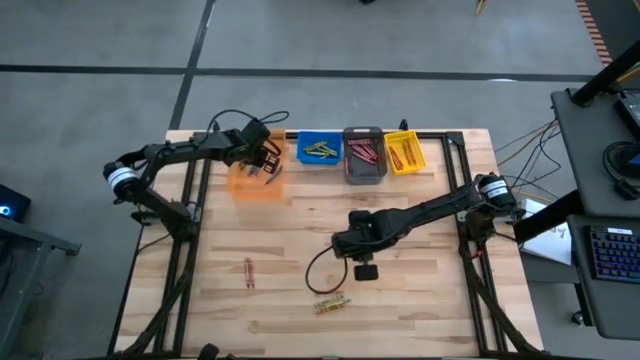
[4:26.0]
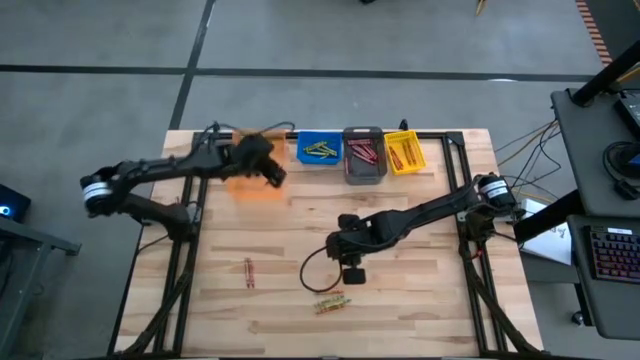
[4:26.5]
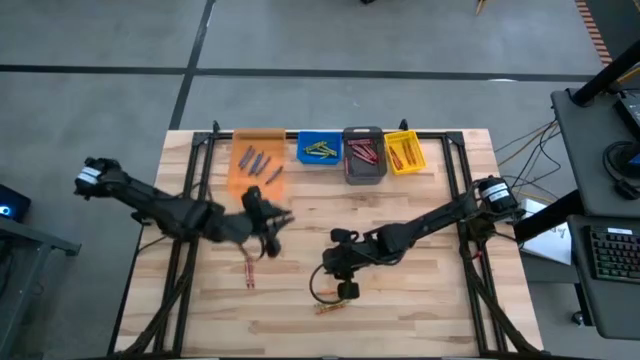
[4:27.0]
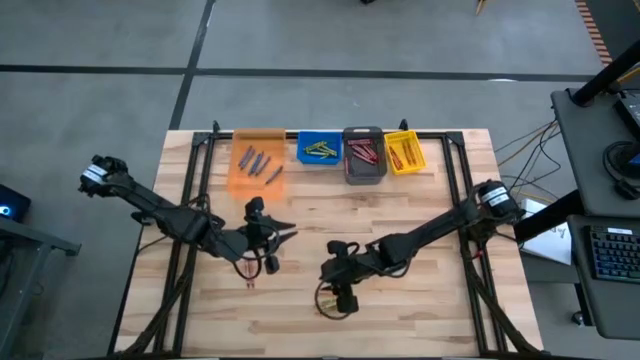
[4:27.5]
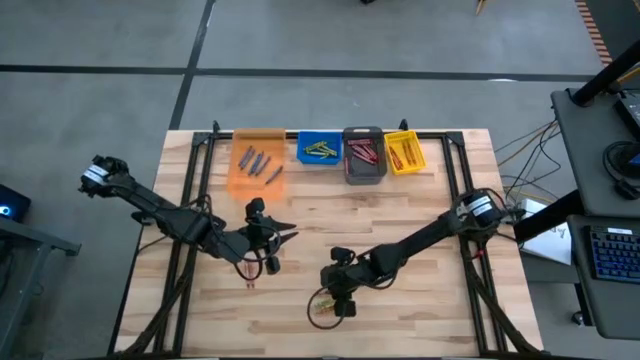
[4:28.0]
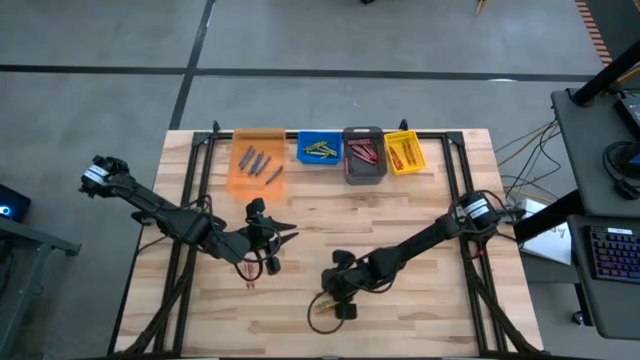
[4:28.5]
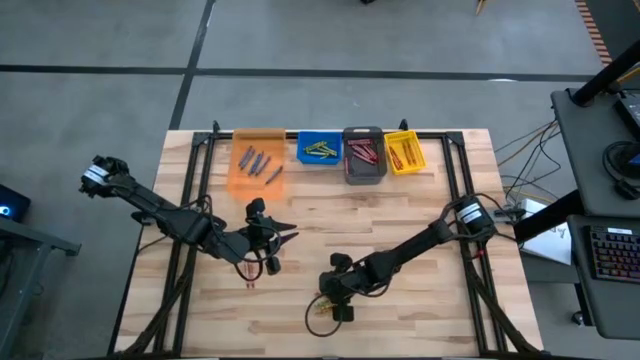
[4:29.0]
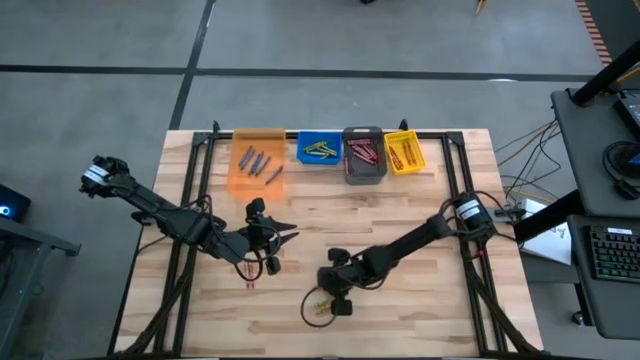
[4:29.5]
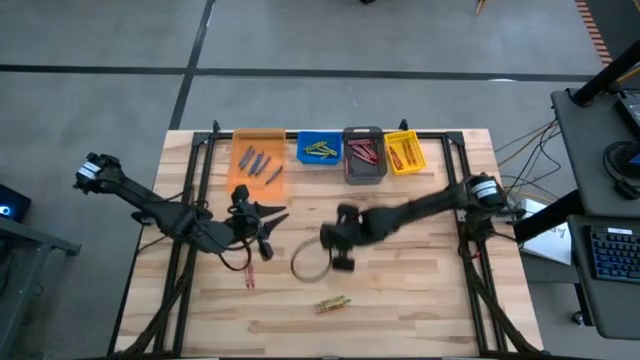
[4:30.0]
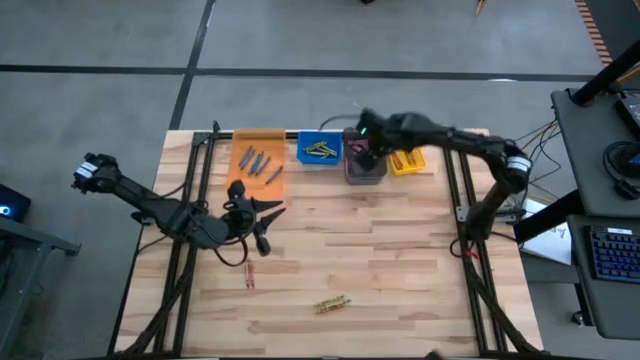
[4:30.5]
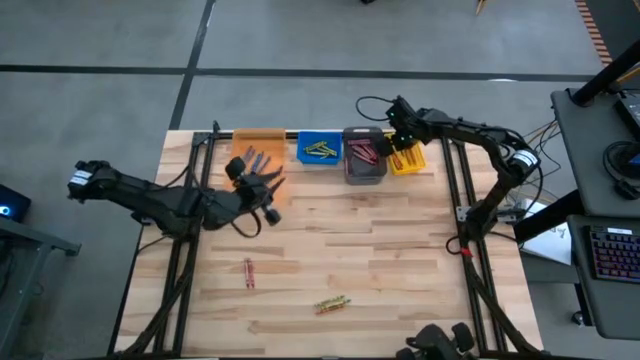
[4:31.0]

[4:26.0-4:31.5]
Task: Sort crayons
Put the orange crayon into the yellow bin

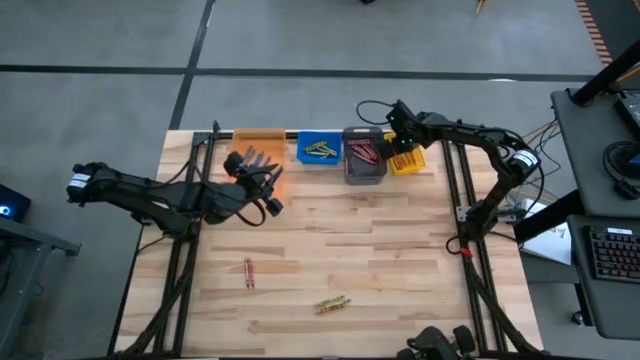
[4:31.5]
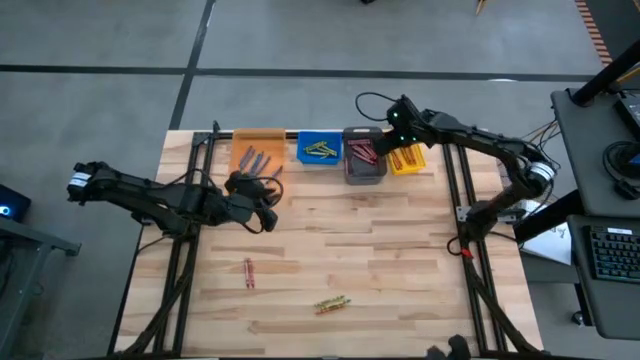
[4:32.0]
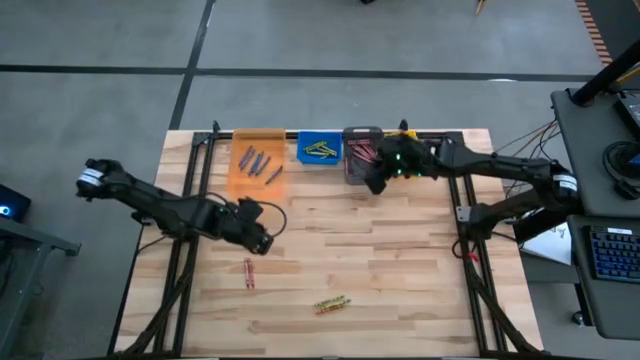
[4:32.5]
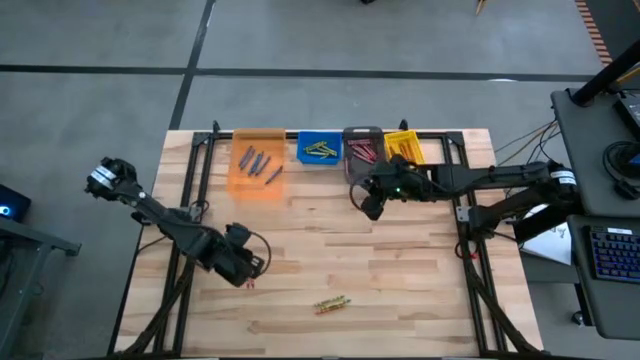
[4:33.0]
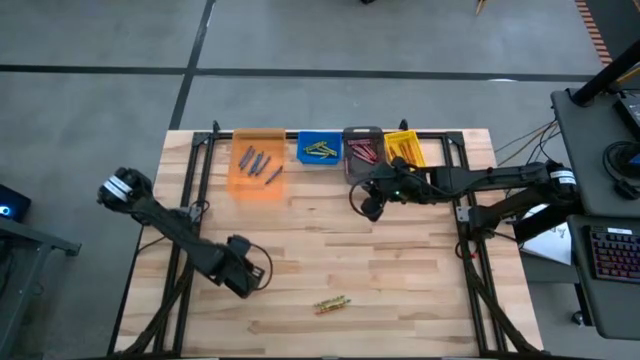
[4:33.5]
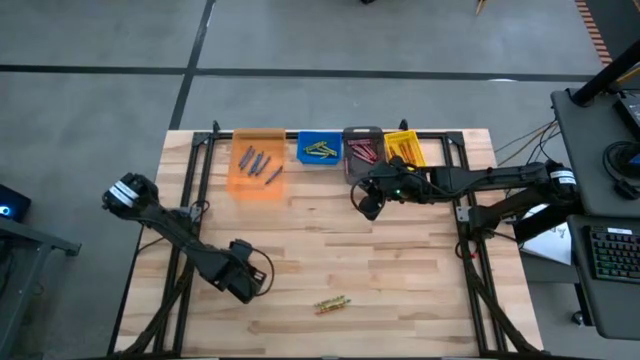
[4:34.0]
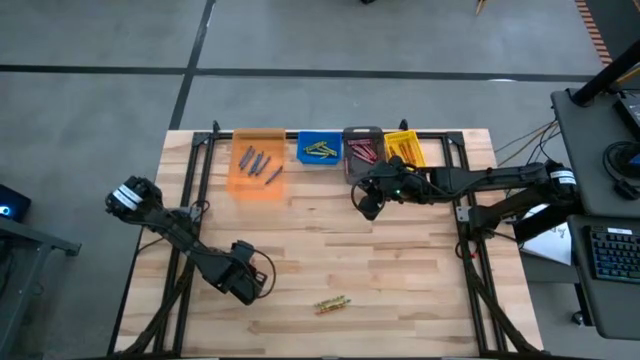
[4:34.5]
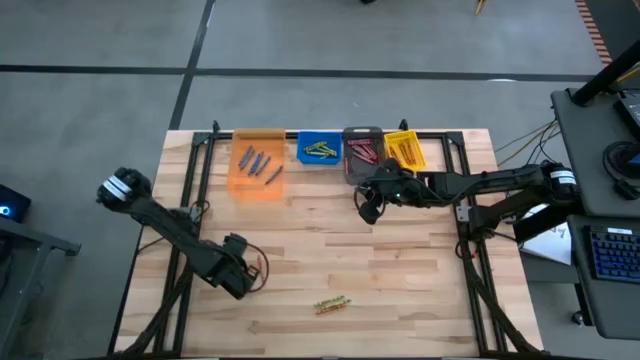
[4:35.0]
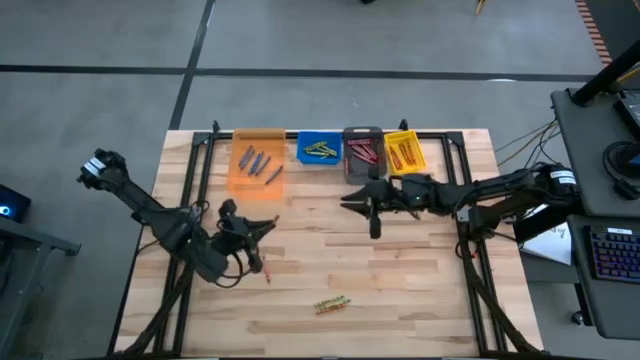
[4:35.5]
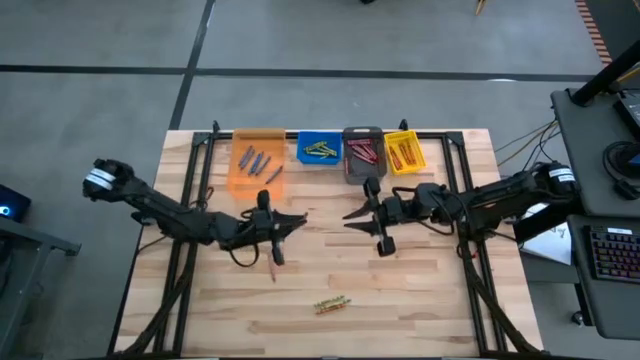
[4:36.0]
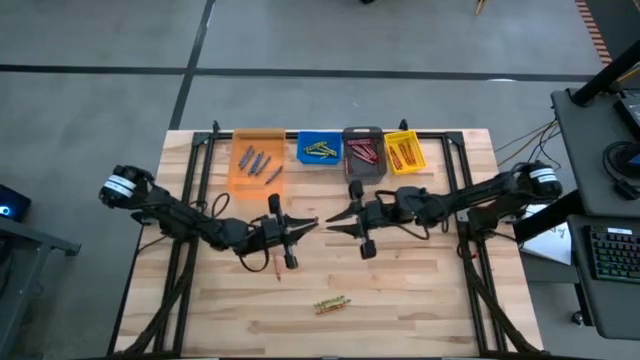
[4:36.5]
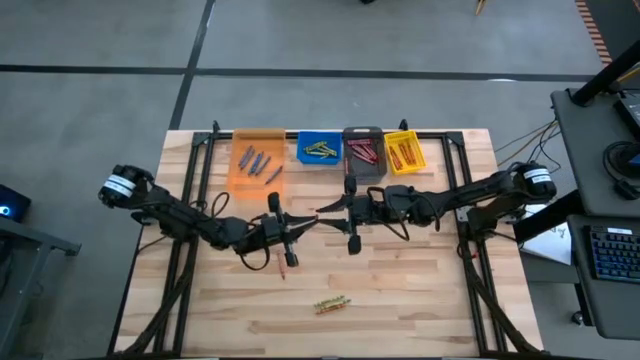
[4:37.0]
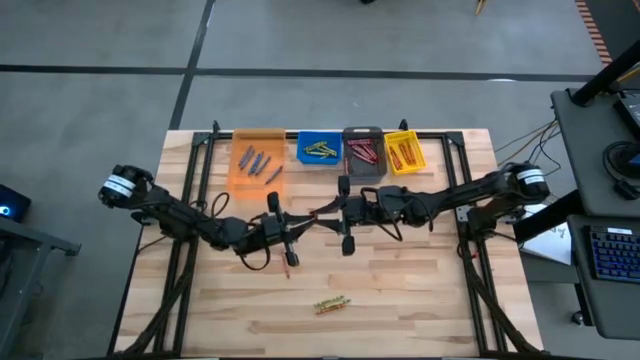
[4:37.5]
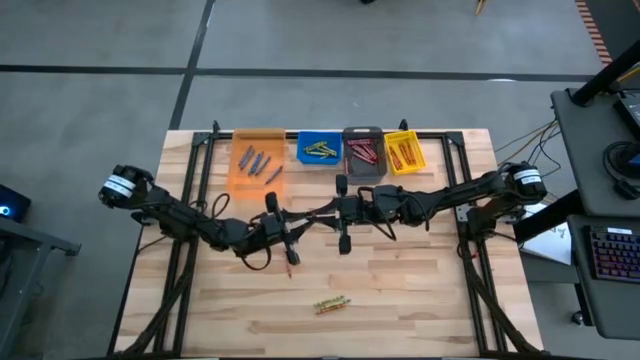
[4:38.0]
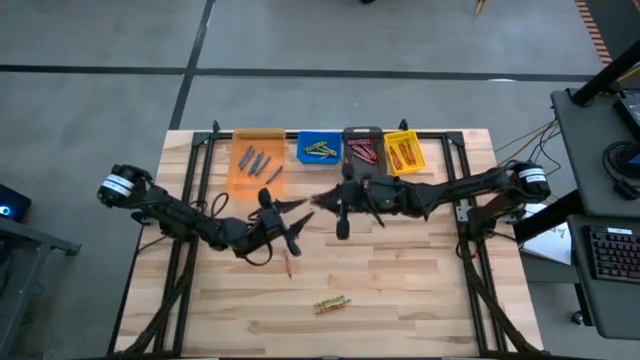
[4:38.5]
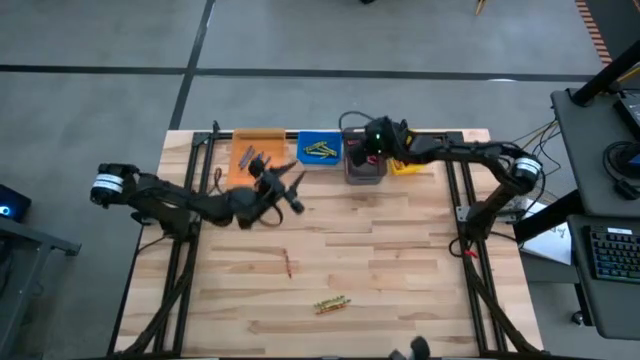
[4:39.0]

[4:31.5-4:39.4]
Put the red crayon into the black bin

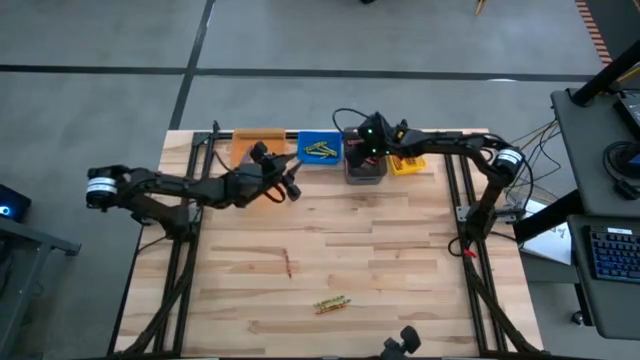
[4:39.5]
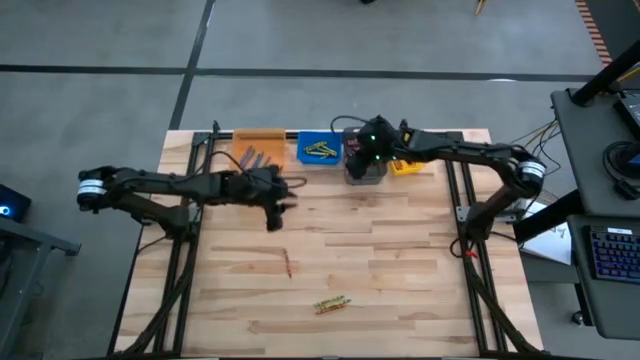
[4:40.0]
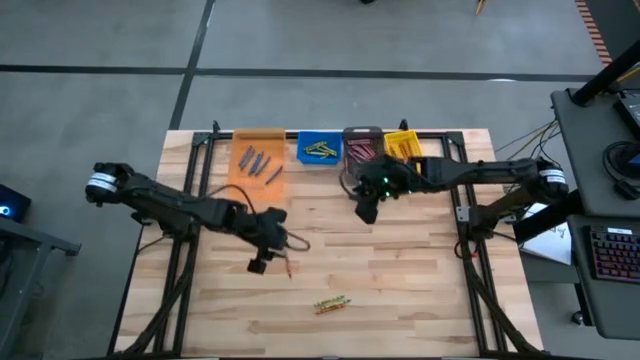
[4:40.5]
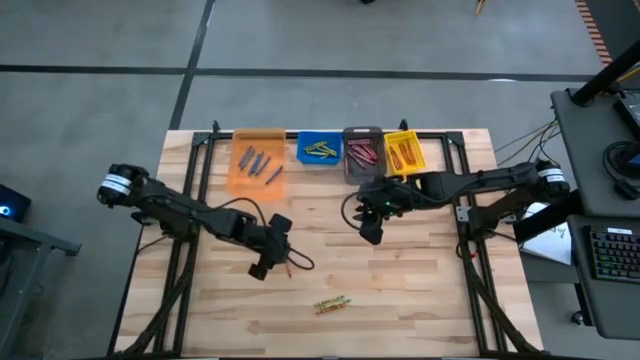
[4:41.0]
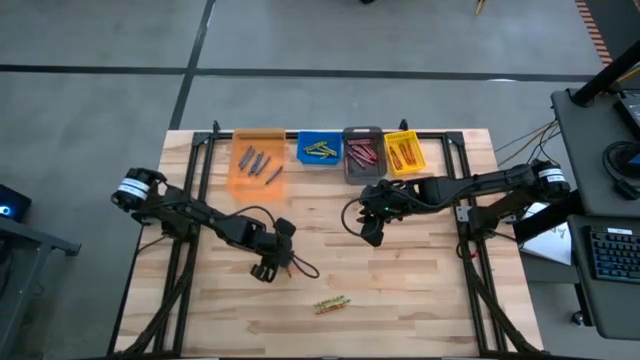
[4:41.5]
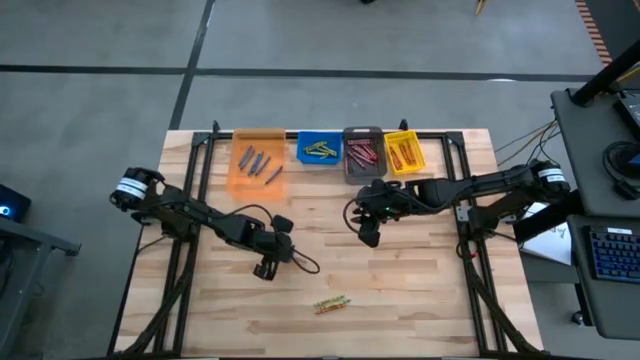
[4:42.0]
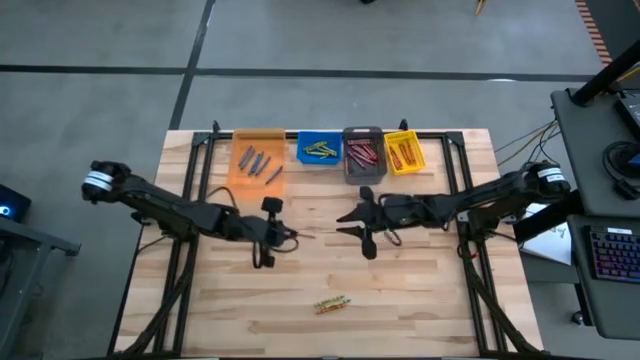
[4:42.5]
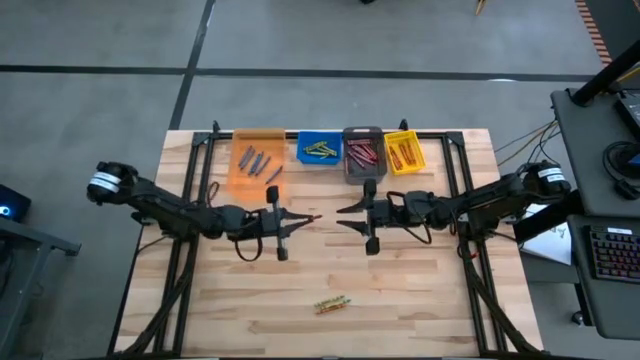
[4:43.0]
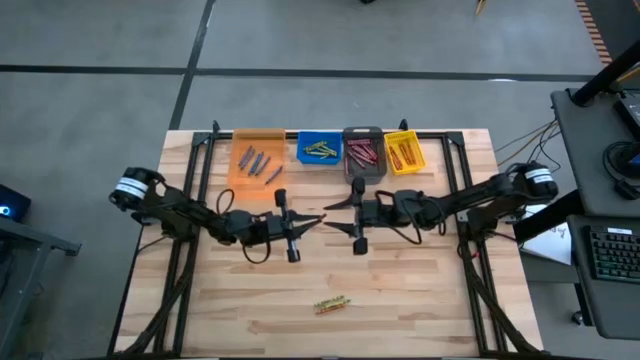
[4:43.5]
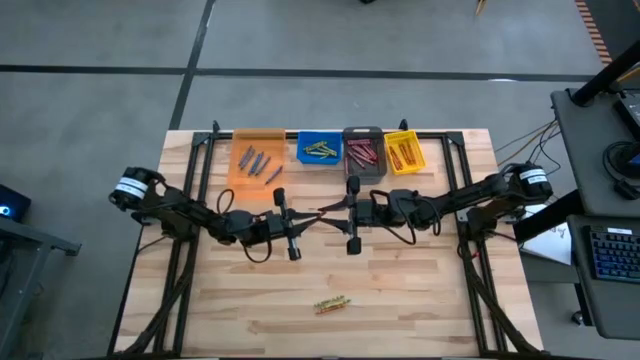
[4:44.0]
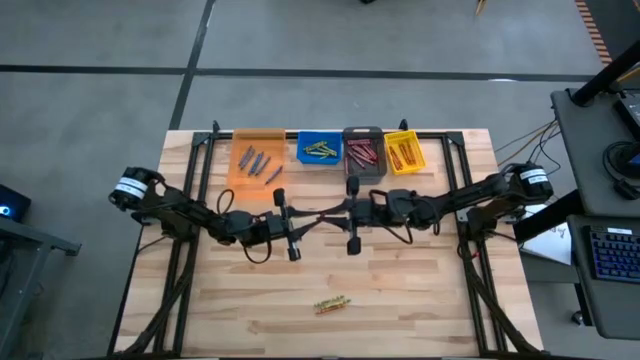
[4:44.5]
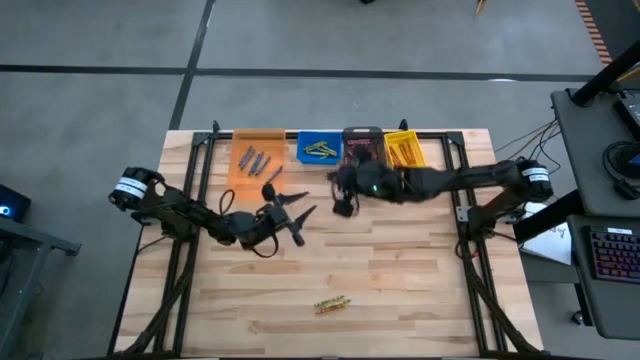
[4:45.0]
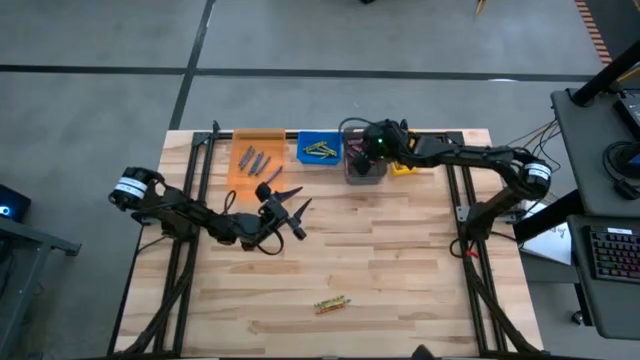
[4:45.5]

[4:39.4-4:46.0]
Put the red crayon into the black bin
